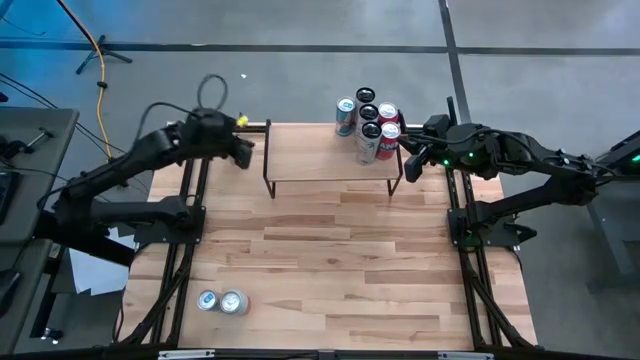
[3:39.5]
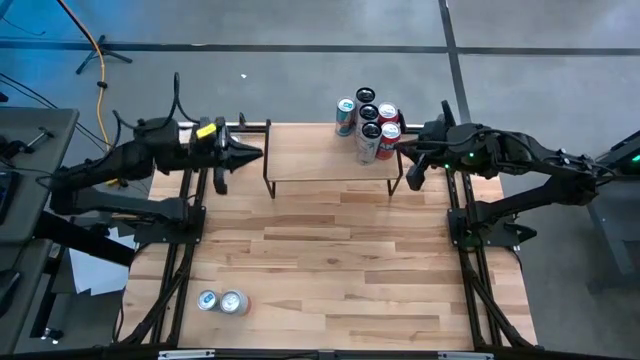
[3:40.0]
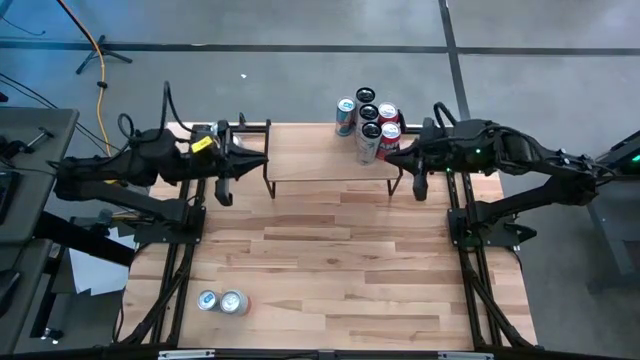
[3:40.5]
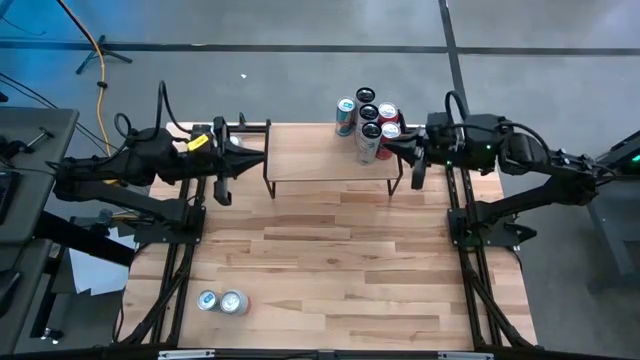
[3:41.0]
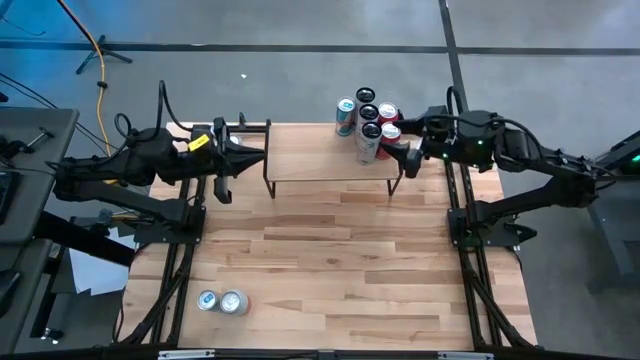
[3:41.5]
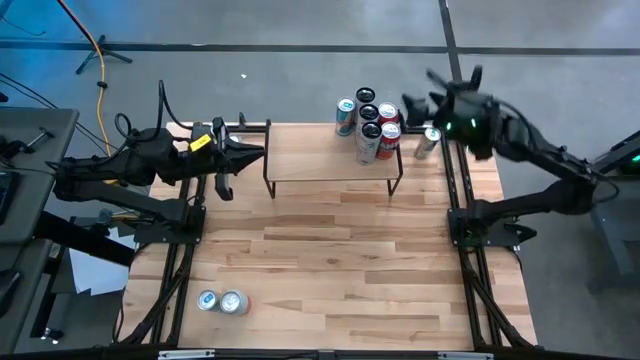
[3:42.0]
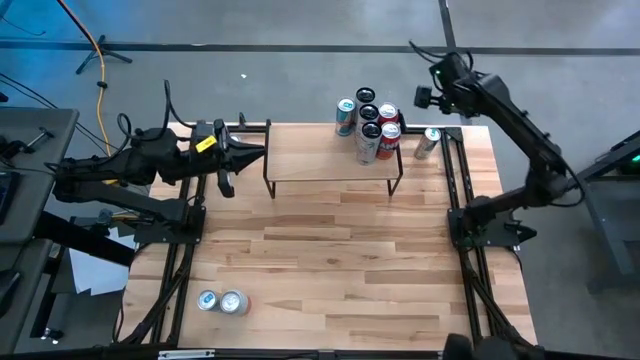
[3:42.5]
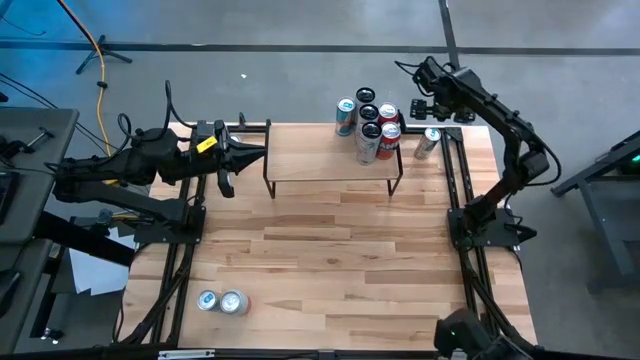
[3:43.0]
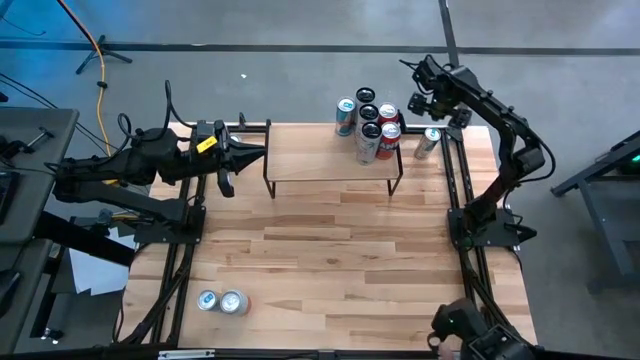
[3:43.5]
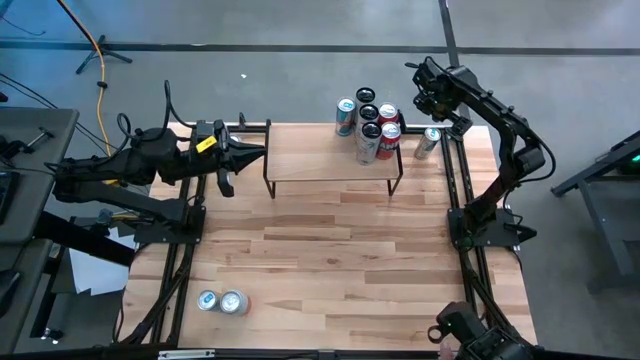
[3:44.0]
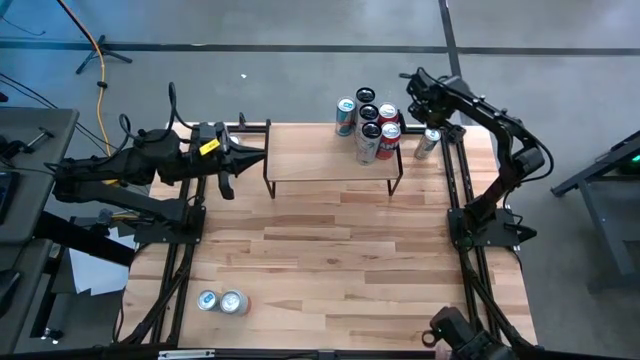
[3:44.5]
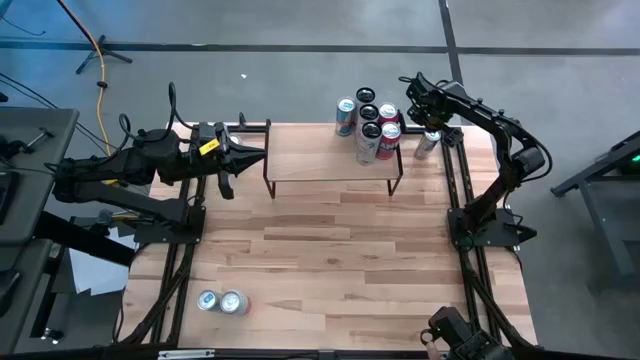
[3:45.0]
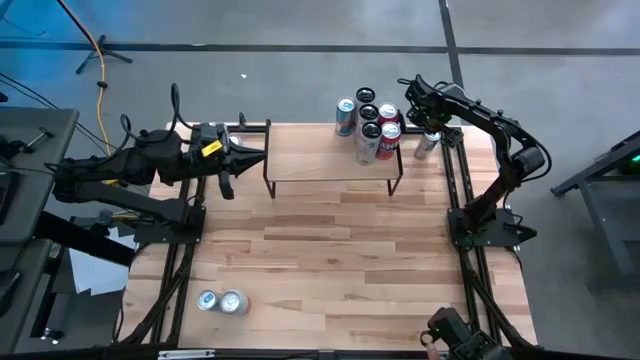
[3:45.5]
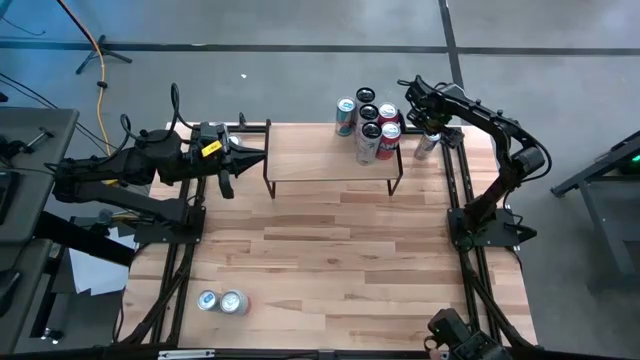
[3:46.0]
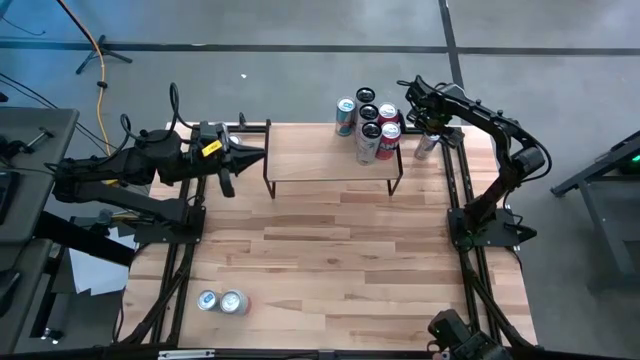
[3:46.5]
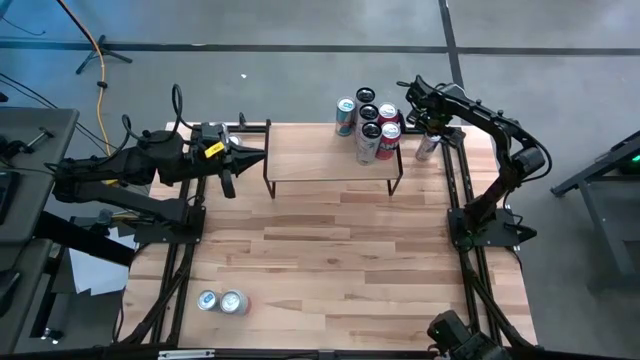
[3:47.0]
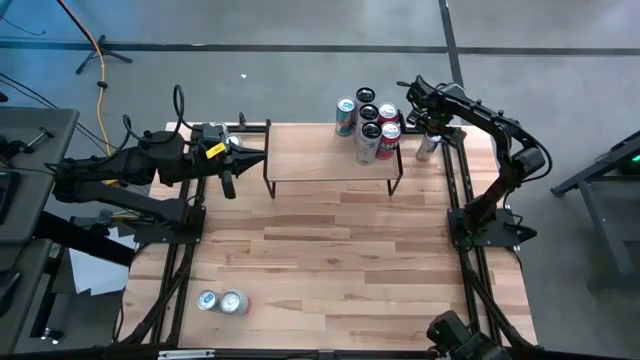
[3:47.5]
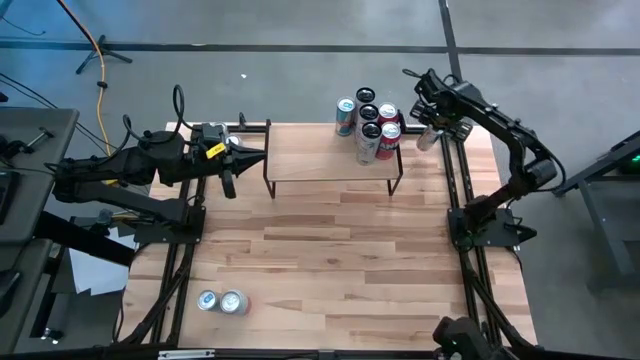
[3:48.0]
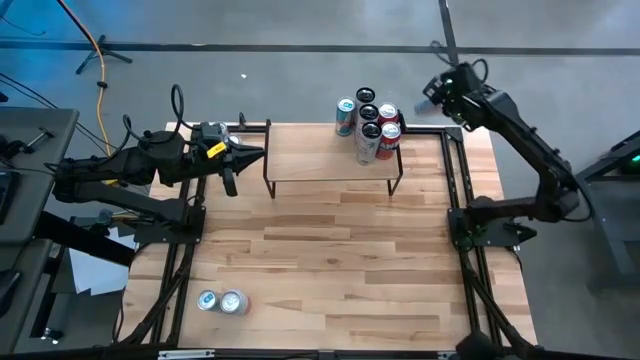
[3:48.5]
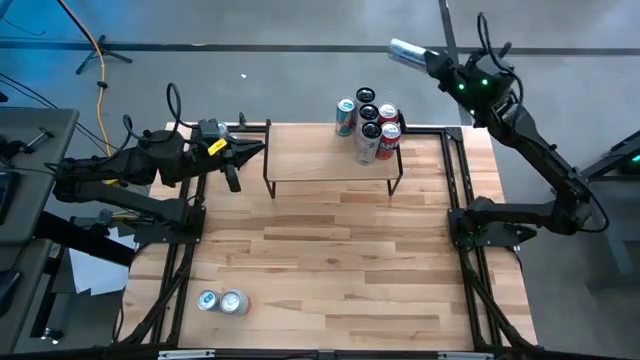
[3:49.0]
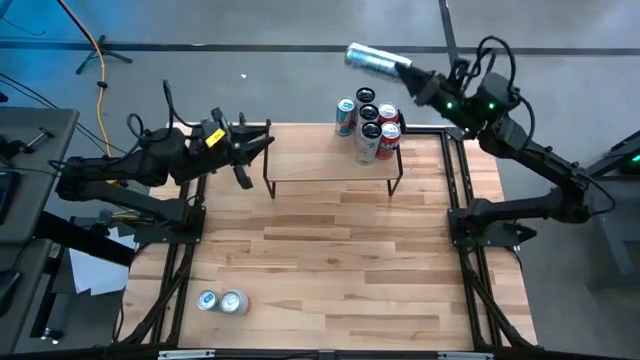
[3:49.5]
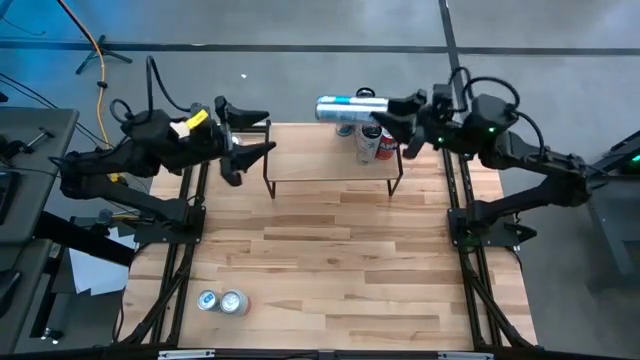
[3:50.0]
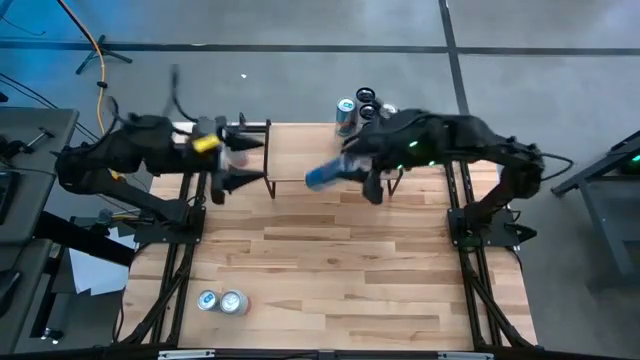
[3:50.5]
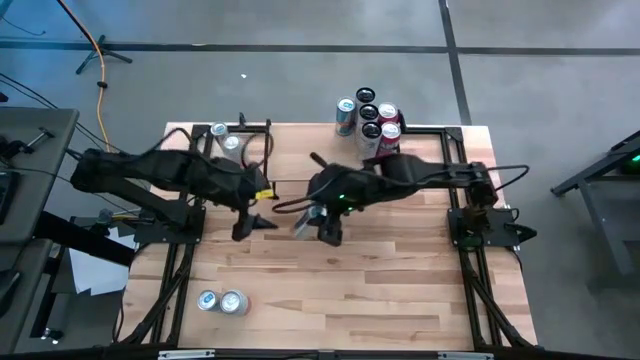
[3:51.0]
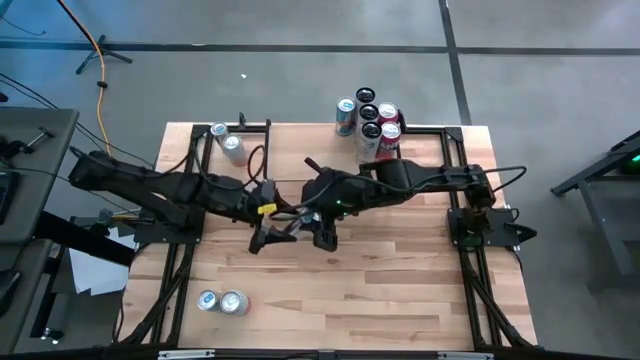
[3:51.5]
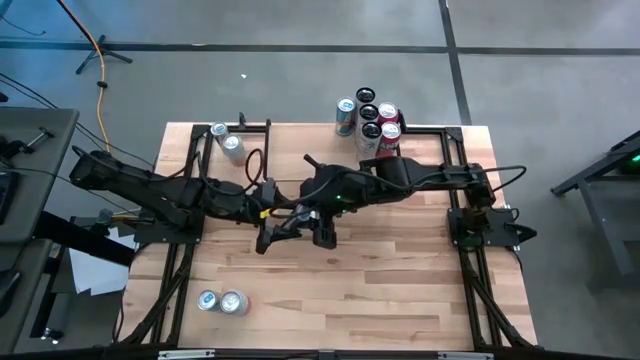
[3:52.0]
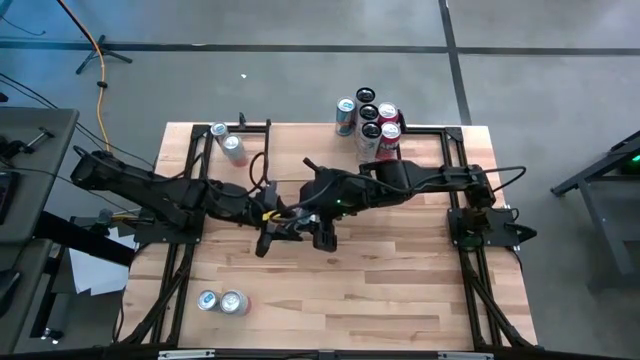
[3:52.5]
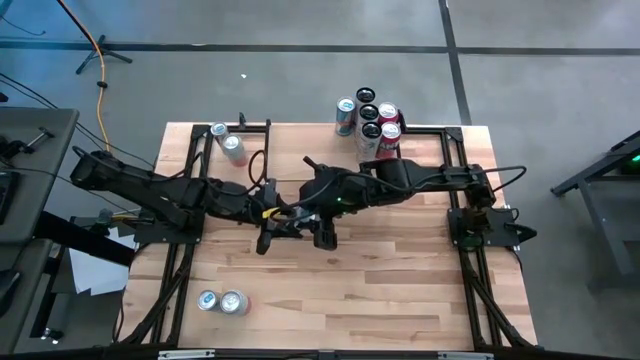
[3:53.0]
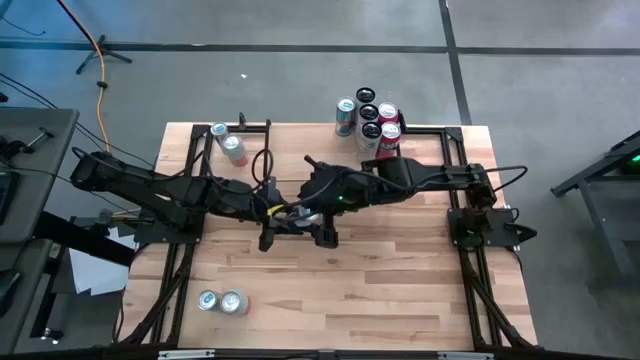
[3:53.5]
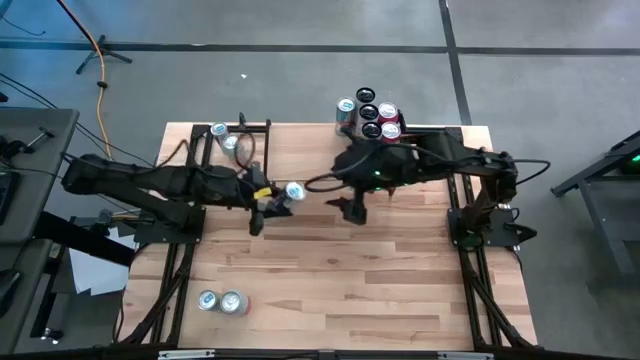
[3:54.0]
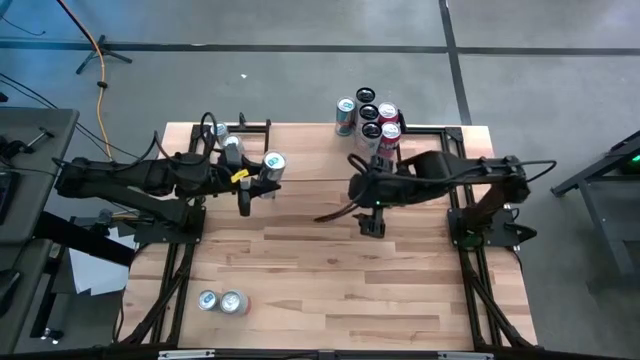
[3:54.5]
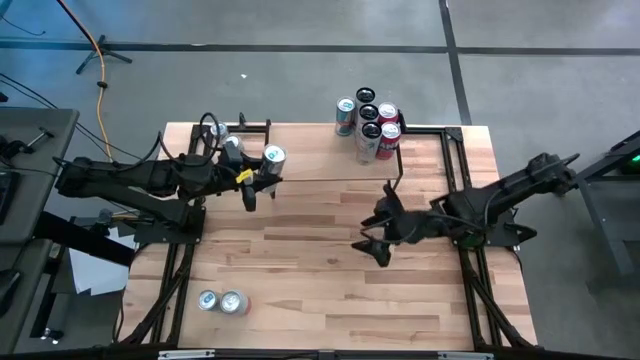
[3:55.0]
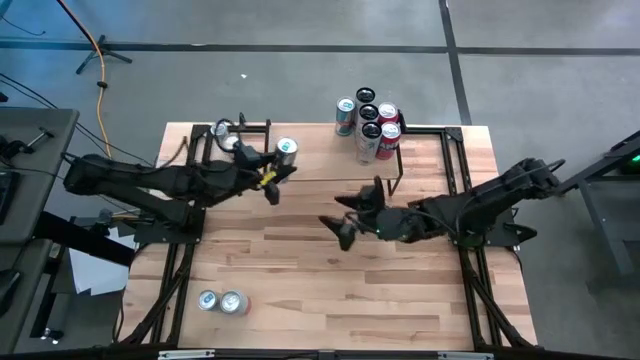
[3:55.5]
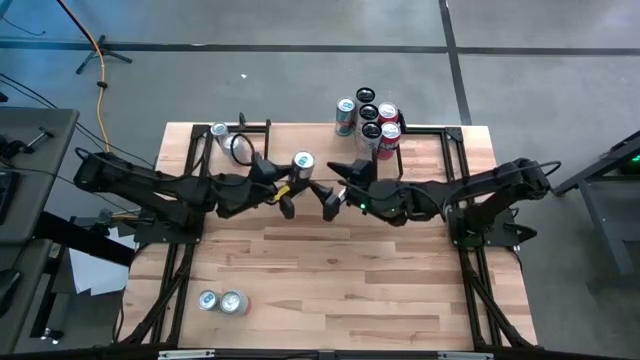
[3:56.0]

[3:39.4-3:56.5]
Task: Place canned beverage on shelf
Put the top right blue soda can on the shelf aligned with the blue soda can

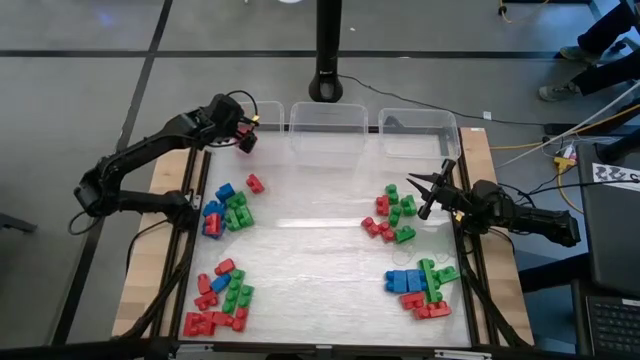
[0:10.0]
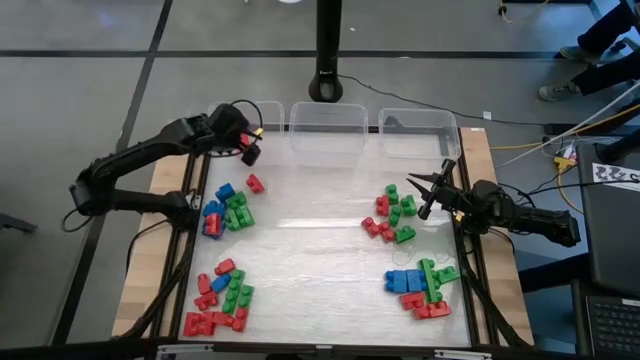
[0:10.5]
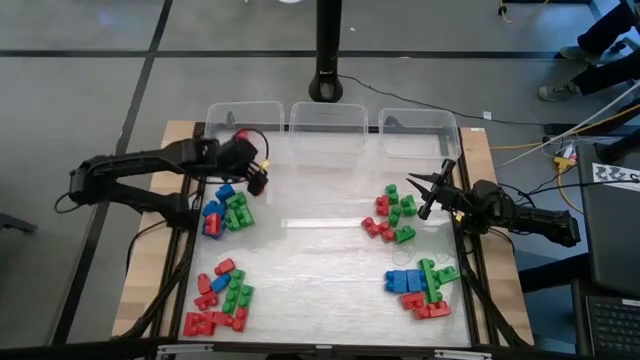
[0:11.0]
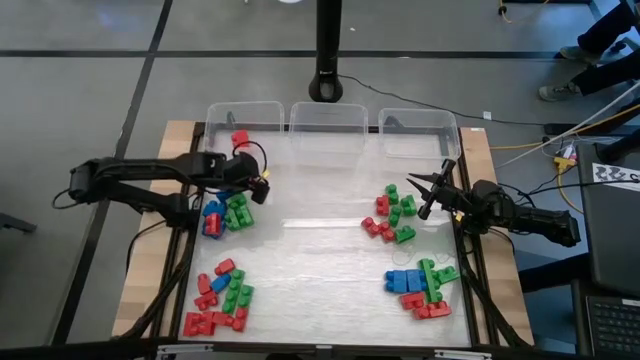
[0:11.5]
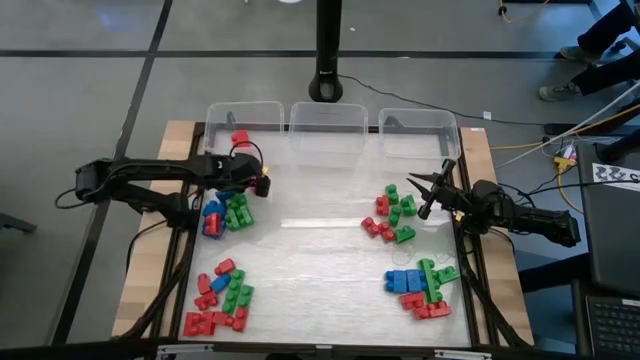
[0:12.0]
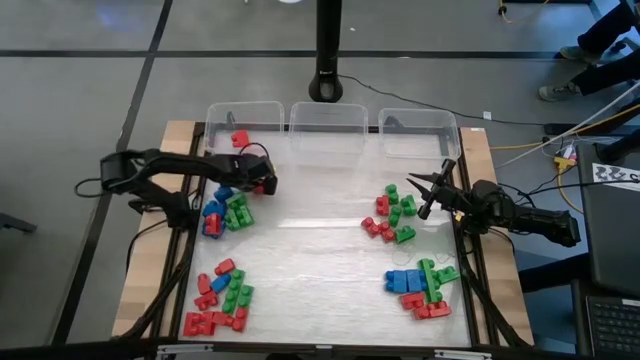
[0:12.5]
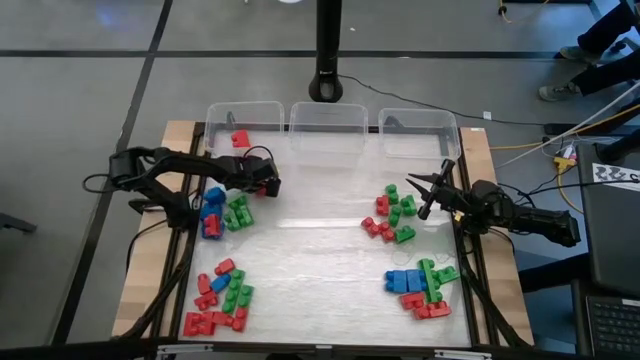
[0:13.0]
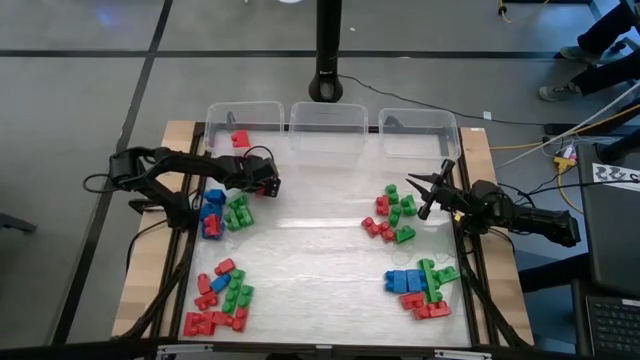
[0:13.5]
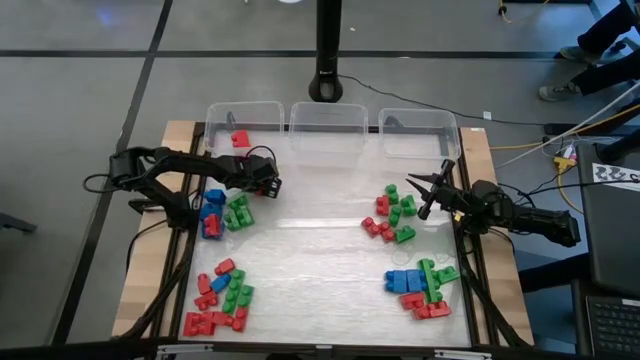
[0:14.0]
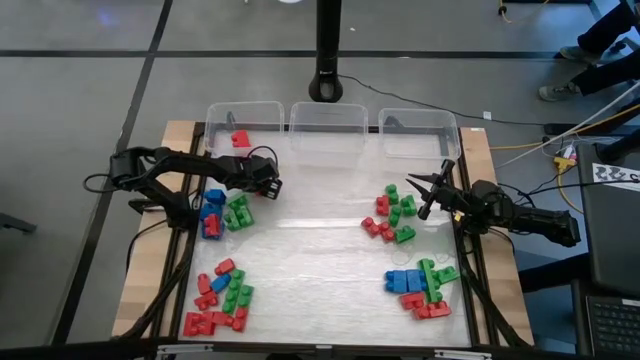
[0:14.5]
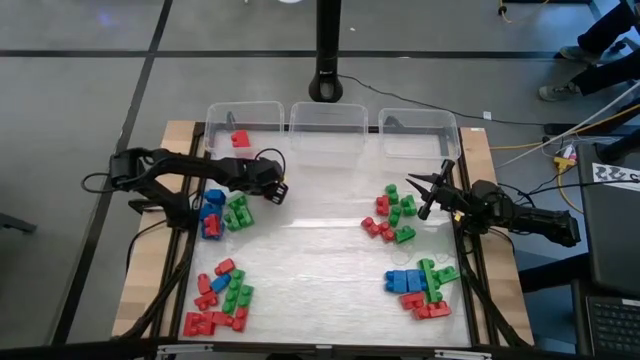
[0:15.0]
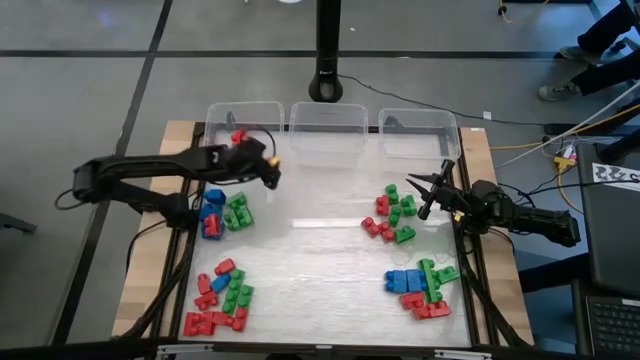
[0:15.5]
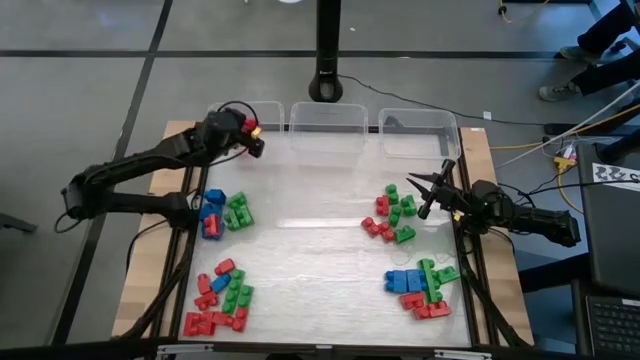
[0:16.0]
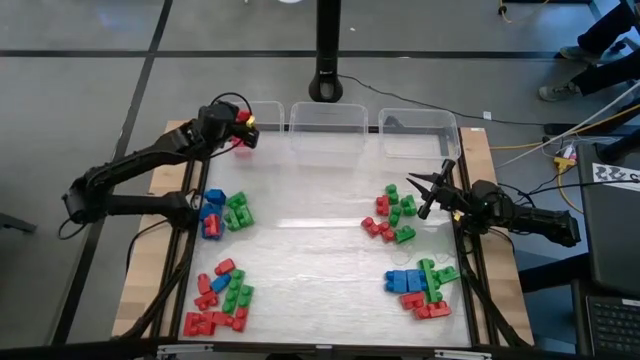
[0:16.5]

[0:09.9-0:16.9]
Task: Sort blocks
Put the red game piece into the left transparent bin
